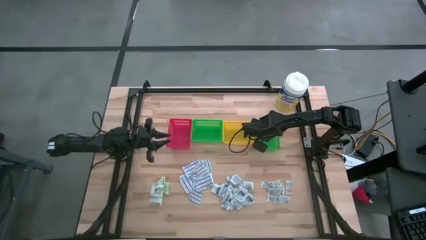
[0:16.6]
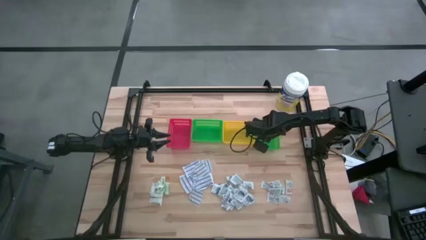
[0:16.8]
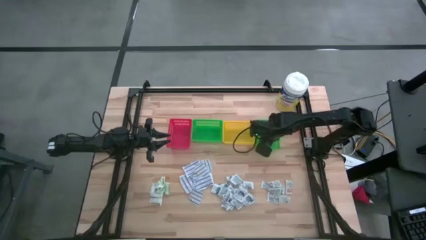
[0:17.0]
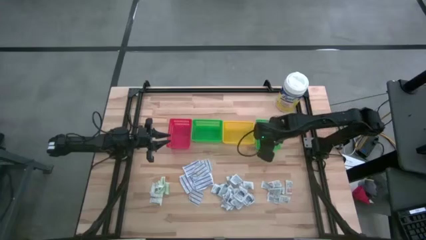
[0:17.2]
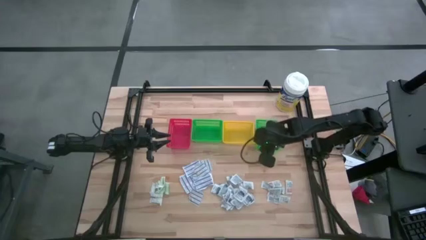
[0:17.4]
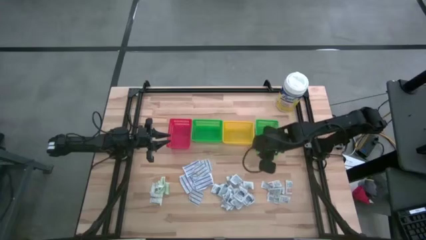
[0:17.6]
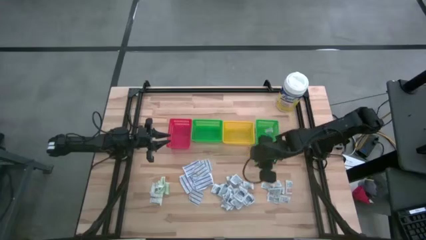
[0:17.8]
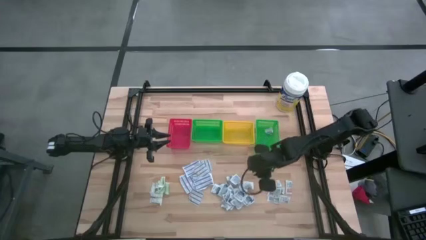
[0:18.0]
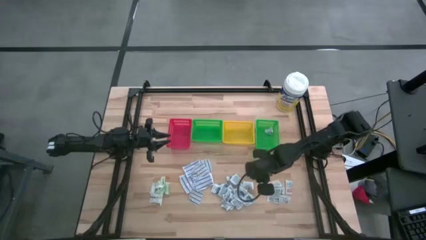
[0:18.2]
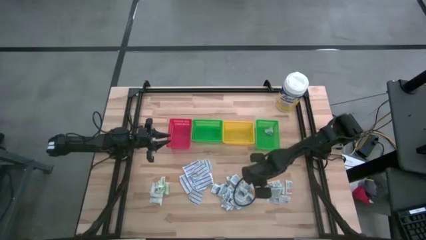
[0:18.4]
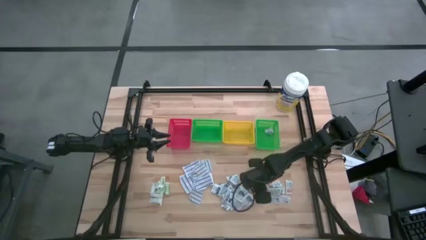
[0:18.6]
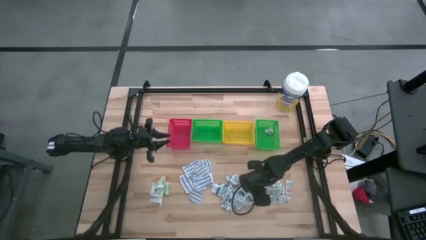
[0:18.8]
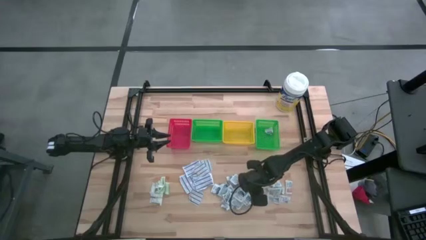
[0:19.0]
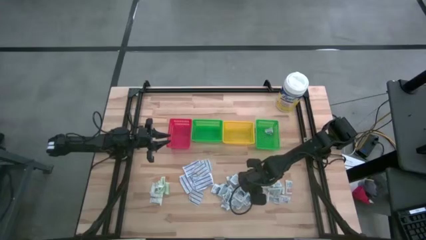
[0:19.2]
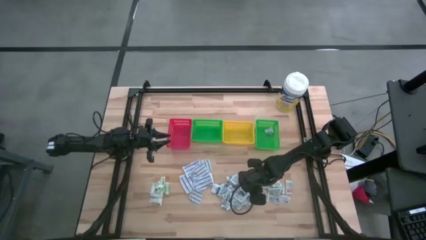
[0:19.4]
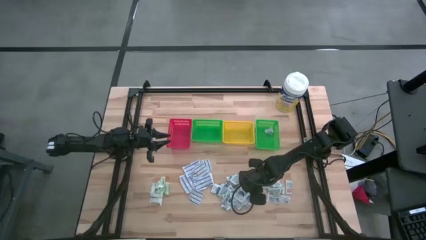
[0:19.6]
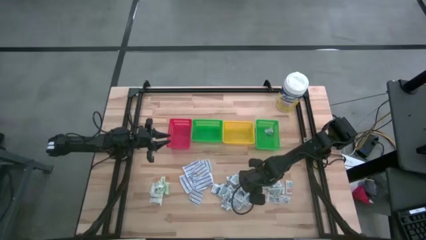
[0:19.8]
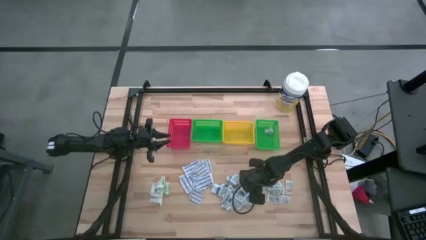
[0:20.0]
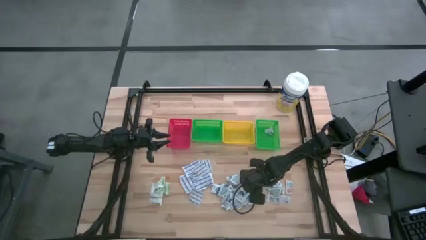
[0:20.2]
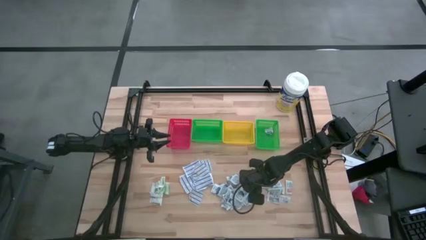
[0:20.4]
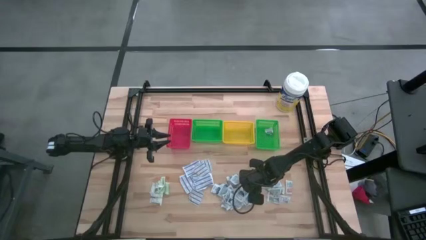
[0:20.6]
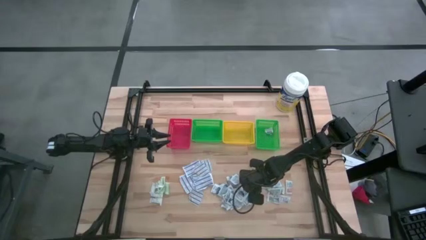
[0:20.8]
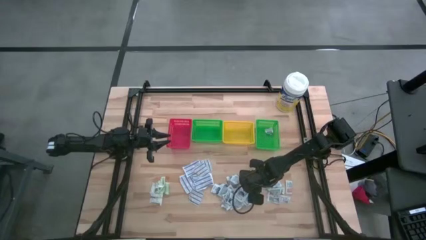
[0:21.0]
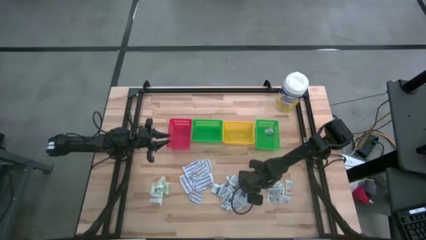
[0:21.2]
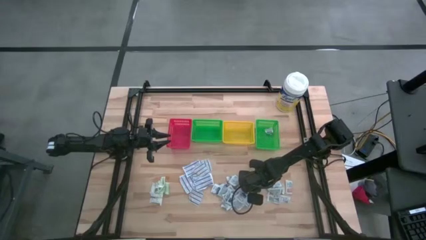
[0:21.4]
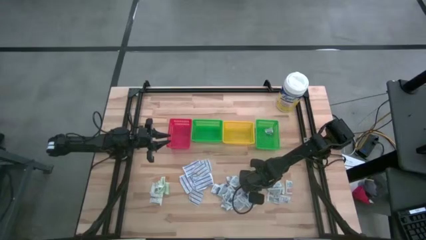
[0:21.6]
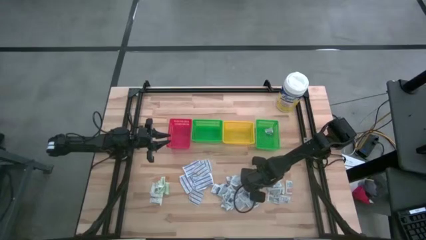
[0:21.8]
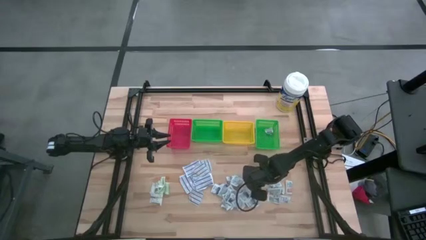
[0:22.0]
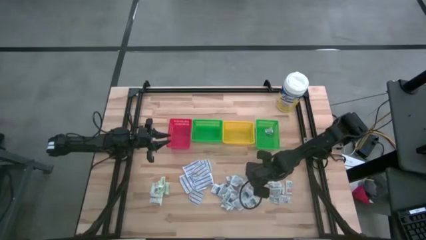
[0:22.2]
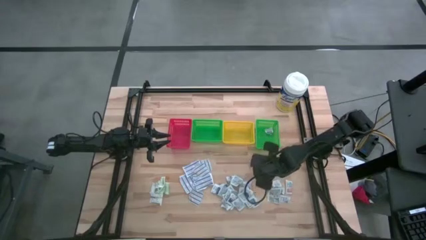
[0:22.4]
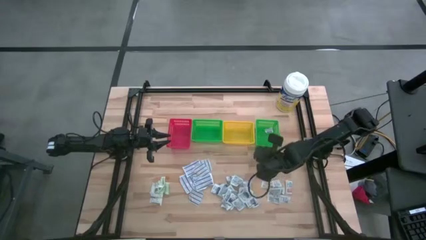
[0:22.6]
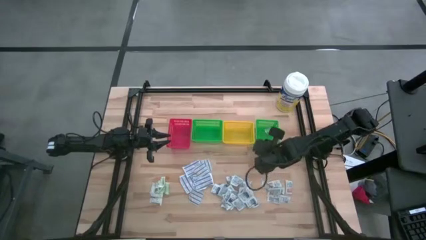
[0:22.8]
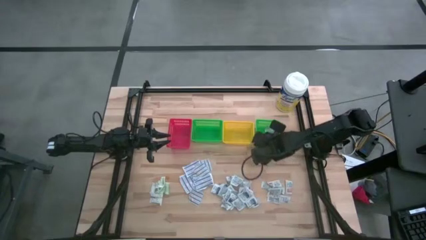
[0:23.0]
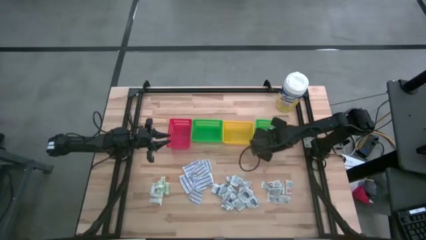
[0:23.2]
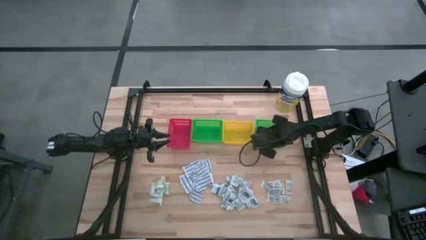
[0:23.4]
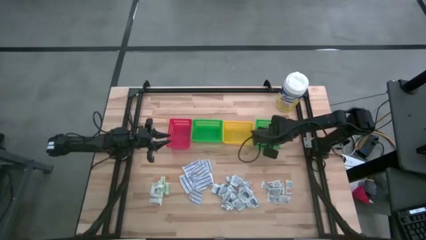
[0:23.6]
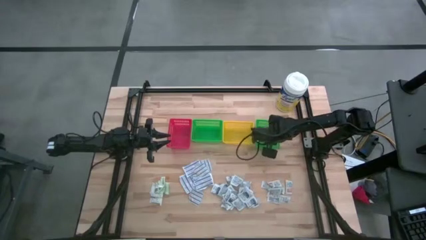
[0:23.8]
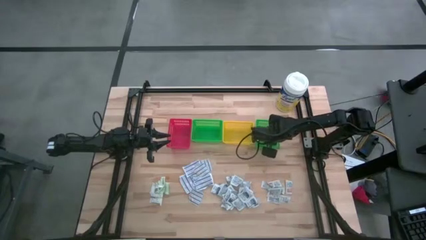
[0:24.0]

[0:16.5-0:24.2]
Task: Pick & Place First Aid Supplies
Put the blue alcohol pad into the right green bin

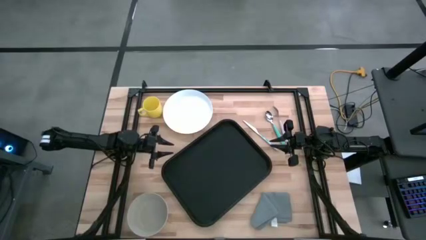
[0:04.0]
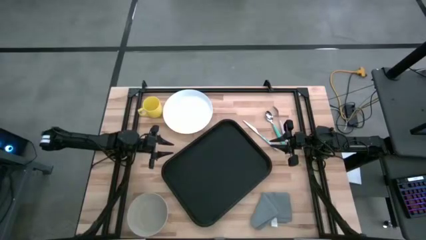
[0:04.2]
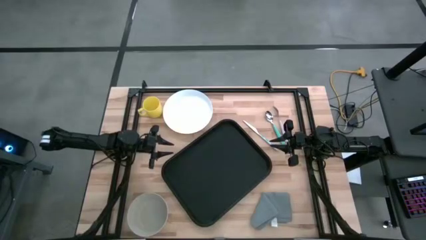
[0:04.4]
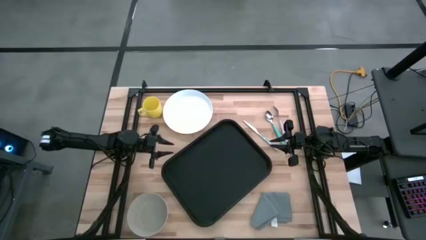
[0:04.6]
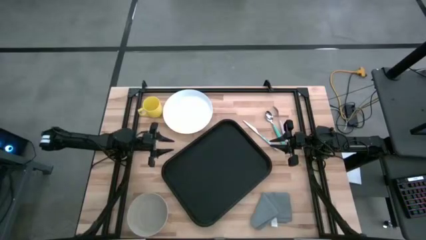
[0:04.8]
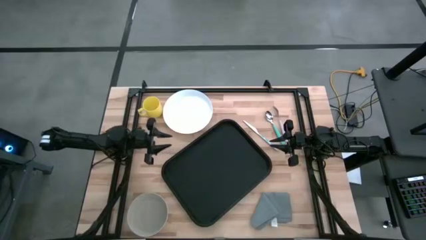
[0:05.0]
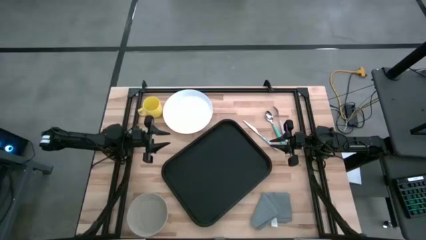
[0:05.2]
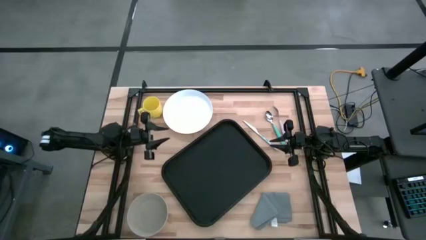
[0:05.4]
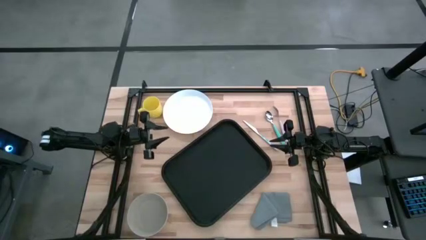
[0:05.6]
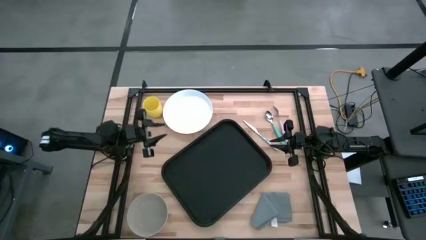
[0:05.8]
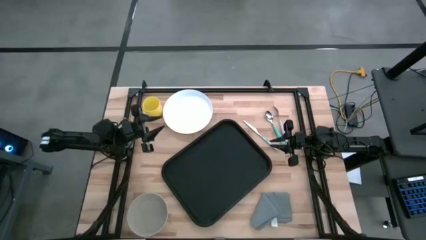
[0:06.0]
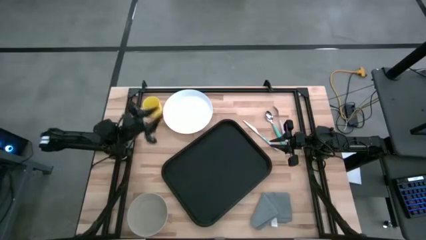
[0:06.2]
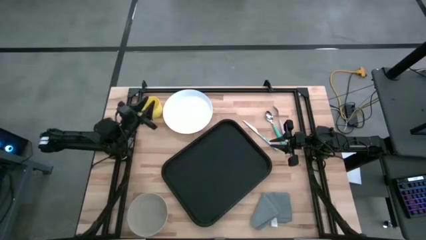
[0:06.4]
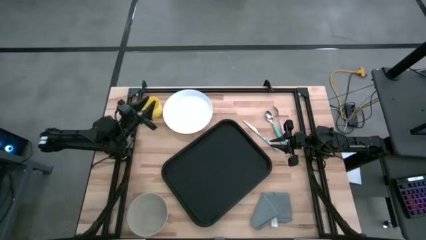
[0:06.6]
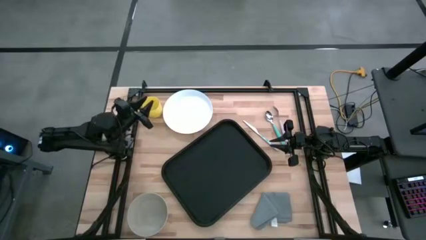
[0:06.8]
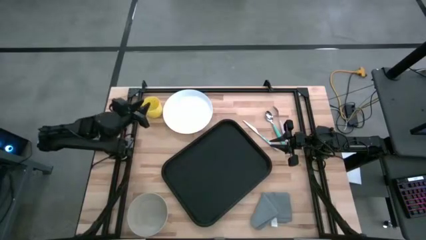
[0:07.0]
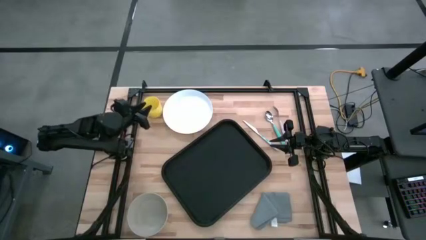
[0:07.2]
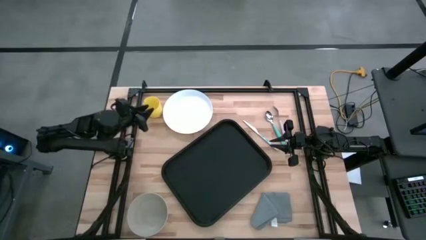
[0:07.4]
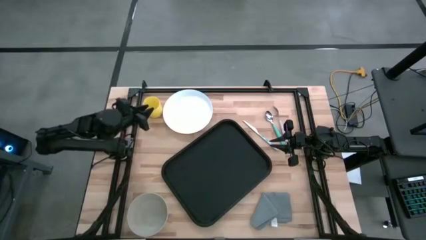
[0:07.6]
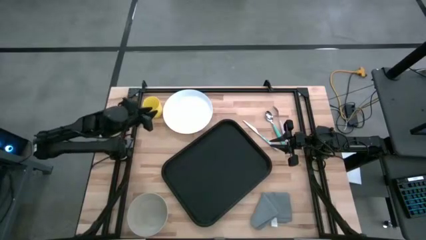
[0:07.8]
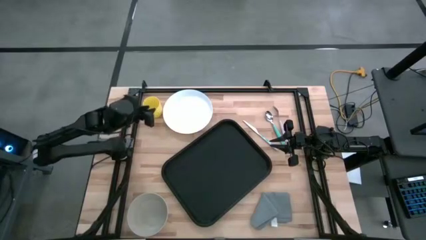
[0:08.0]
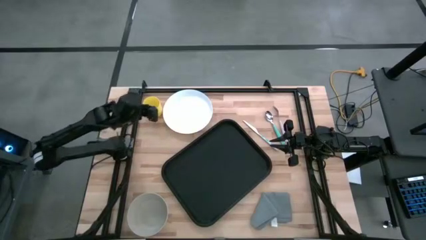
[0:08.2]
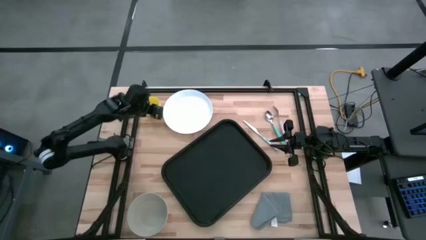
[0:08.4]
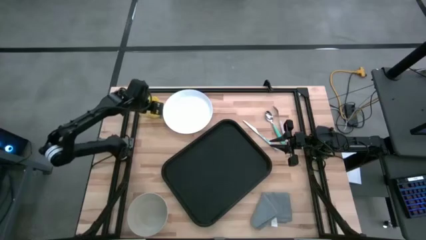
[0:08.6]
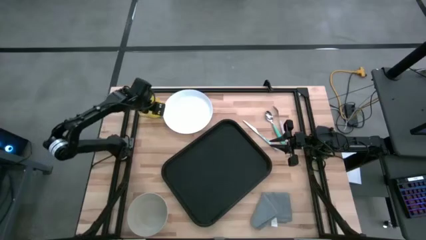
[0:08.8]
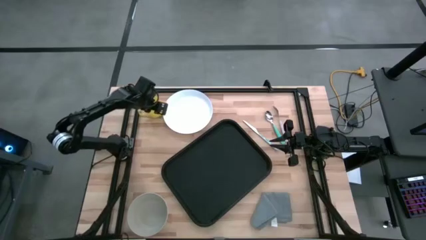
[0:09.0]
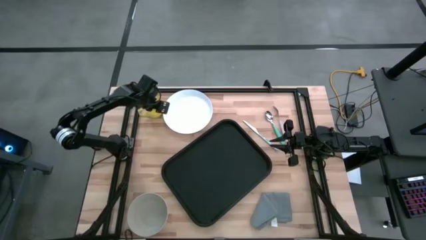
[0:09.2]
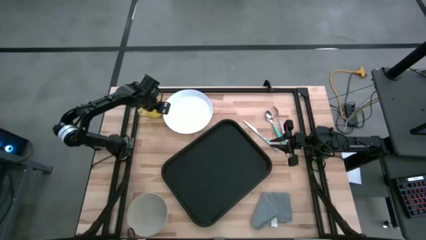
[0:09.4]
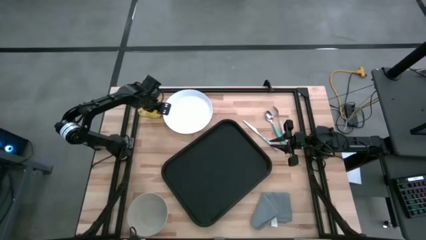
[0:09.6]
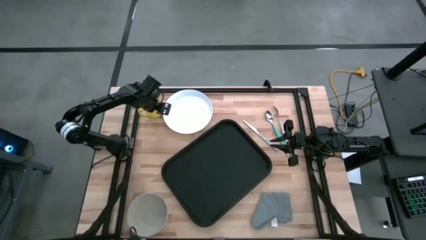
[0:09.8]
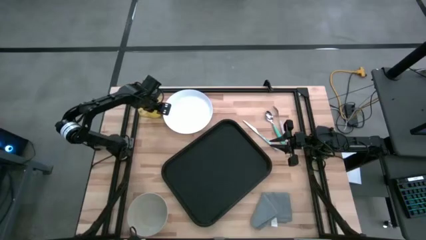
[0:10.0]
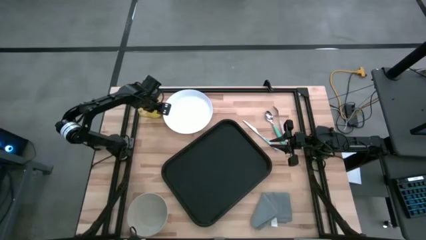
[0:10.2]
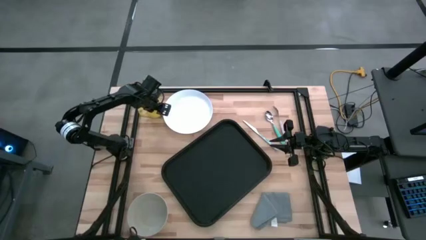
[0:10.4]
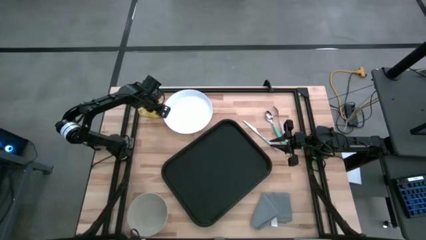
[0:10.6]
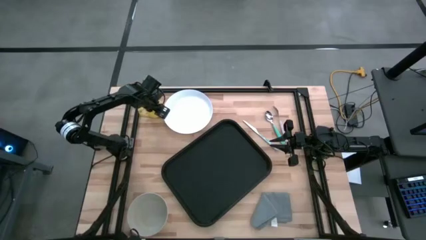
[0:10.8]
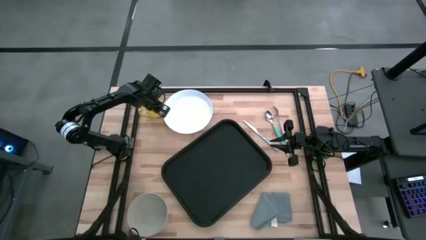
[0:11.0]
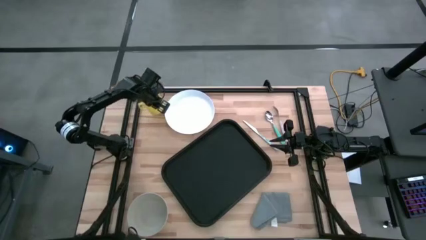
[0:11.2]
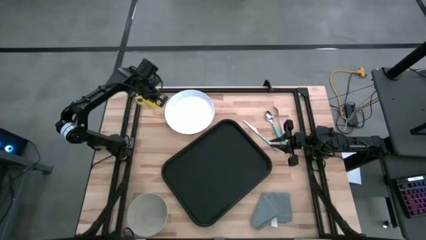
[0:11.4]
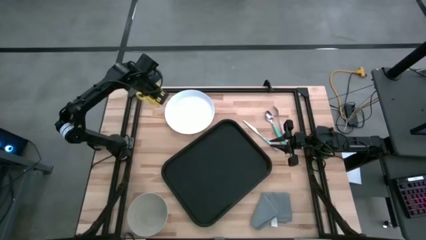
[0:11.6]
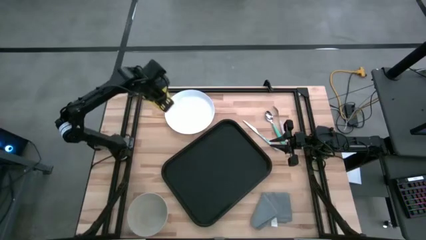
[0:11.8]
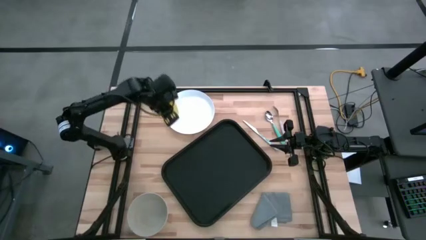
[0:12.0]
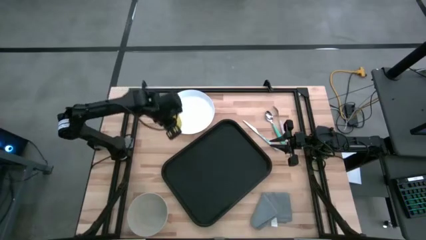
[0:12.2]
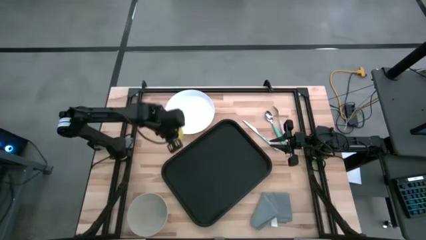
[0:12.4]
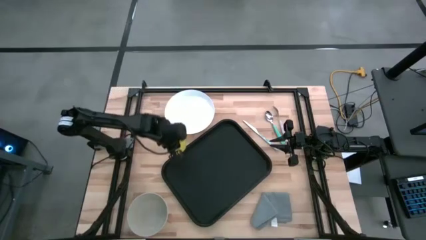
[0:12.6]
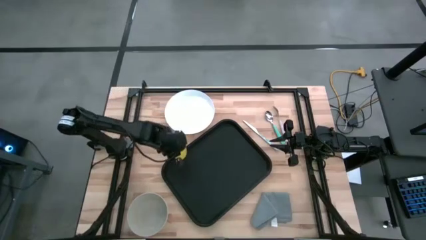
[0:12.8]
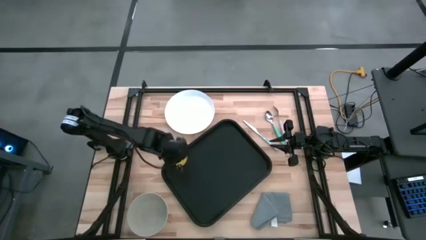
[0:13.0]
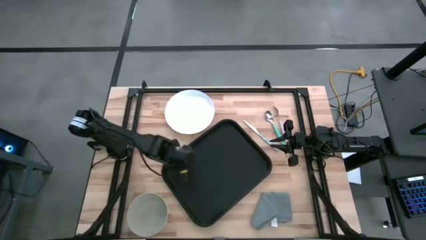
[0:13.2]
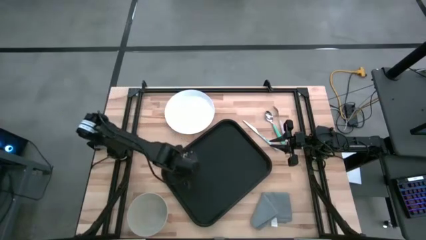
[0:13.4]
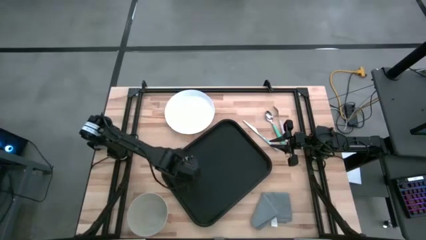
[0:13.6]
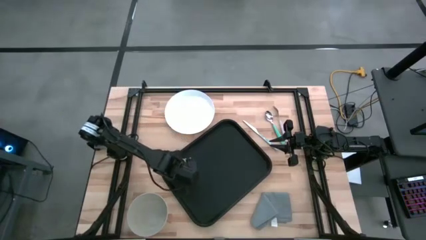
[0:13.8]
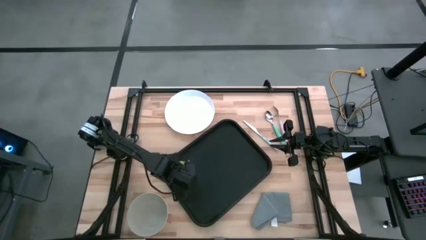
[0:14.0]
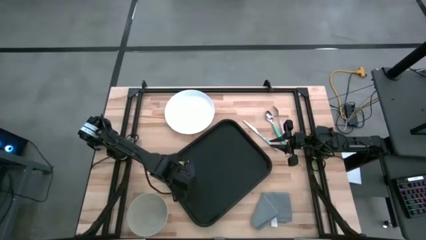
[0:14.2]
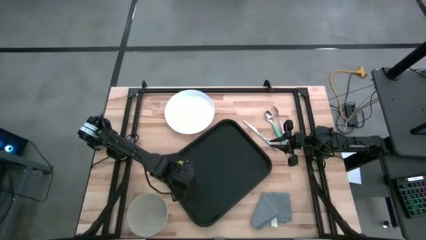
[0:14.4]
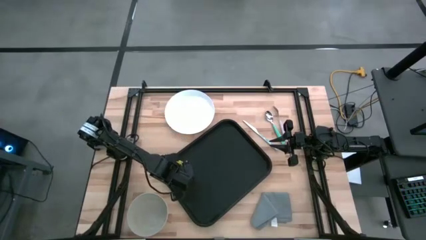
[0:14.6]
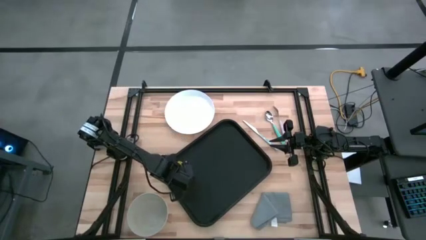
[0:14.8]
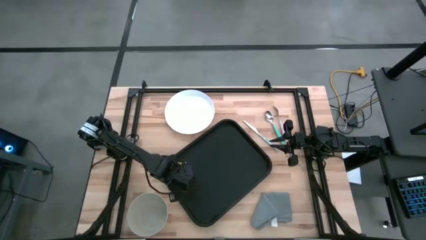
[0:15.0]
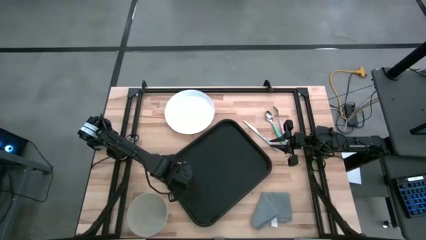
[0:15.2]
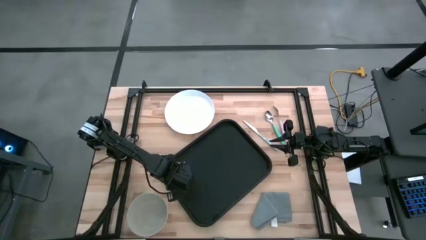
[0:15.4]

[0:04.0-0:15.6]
Task: Set up tray
Put the yellow mug on the black serving tray
